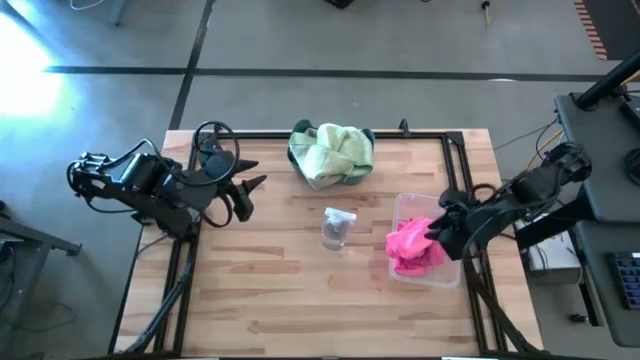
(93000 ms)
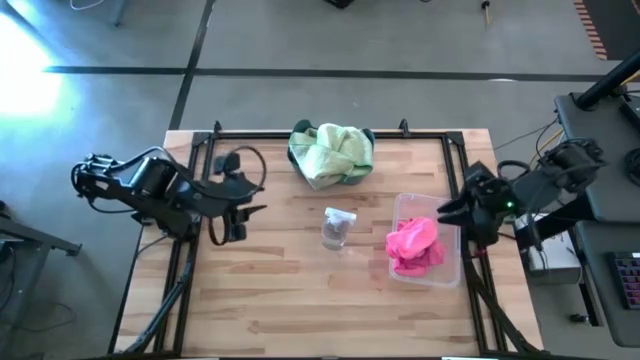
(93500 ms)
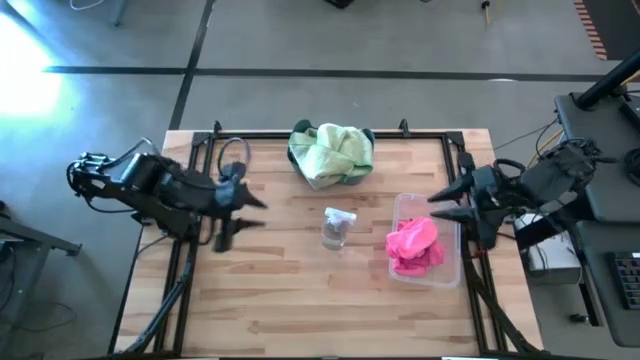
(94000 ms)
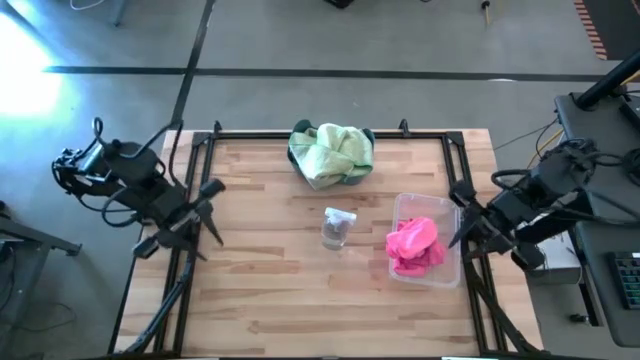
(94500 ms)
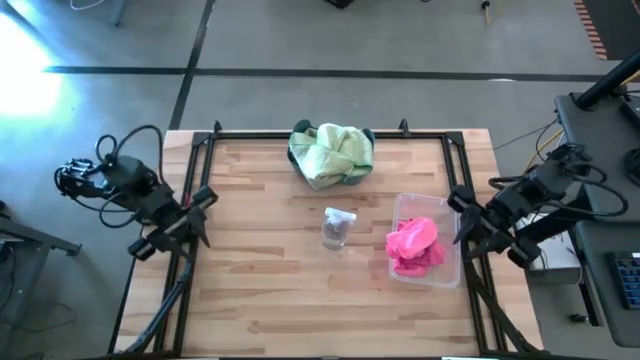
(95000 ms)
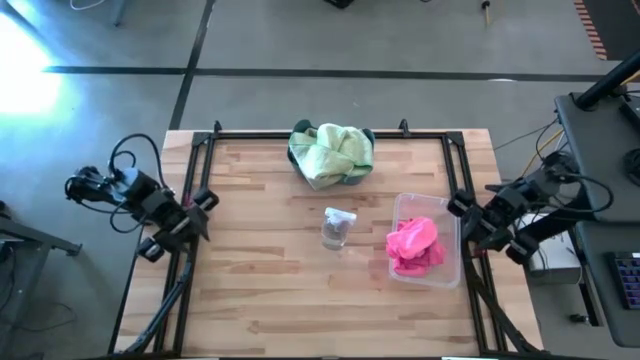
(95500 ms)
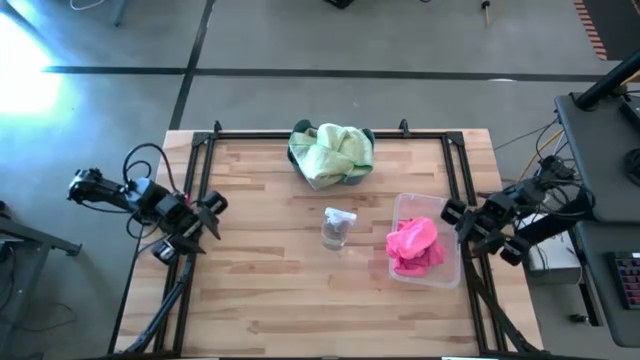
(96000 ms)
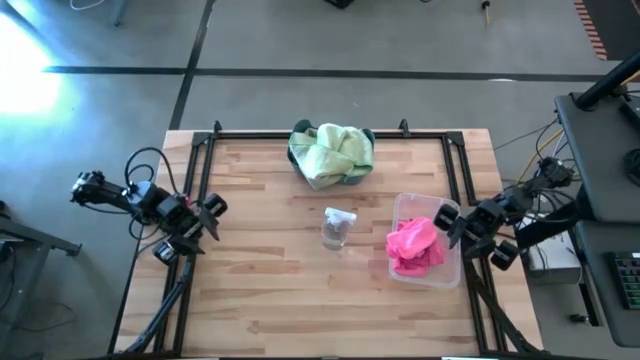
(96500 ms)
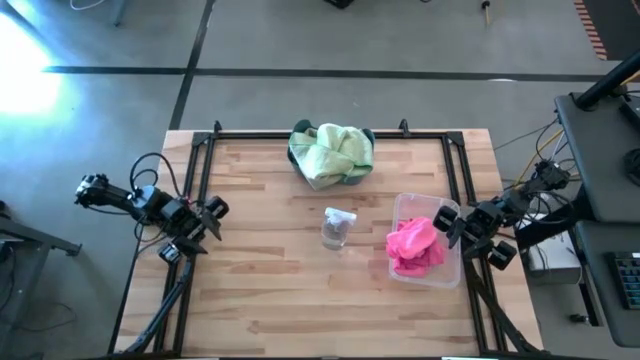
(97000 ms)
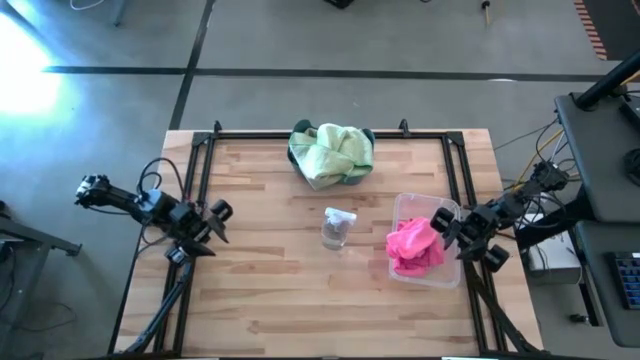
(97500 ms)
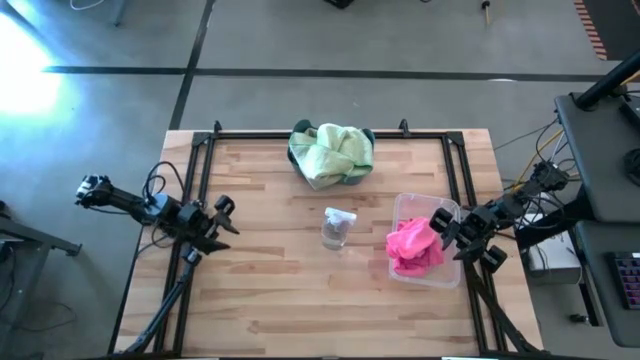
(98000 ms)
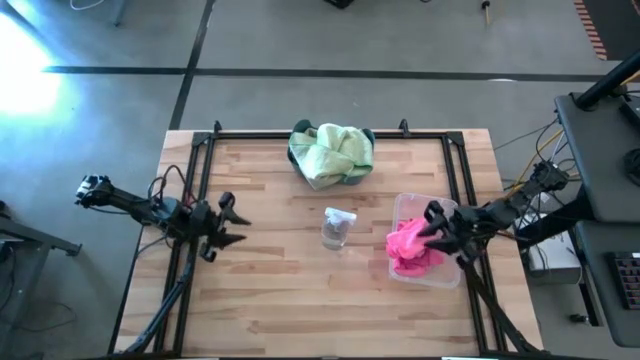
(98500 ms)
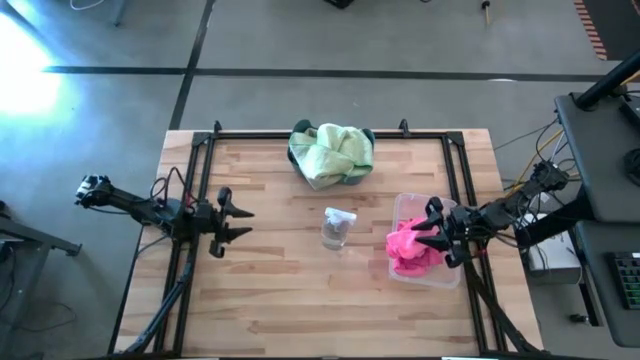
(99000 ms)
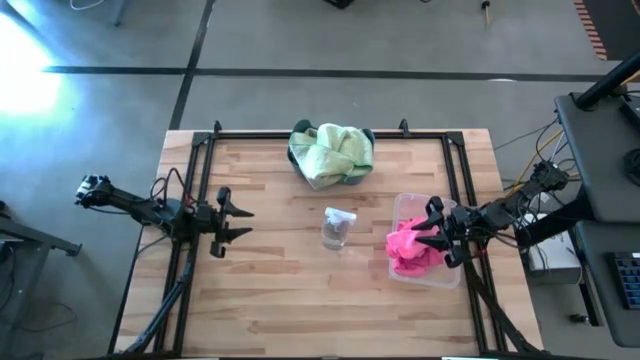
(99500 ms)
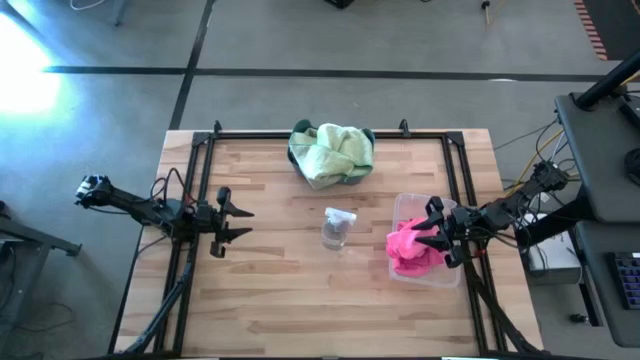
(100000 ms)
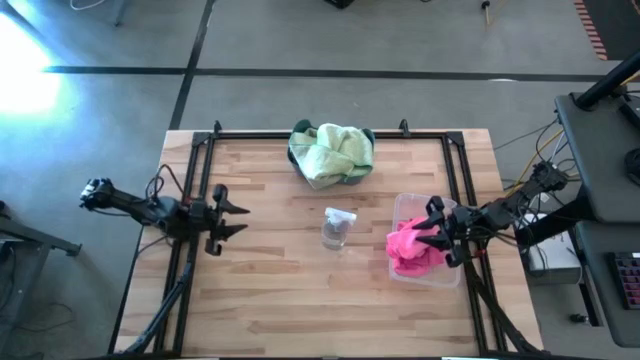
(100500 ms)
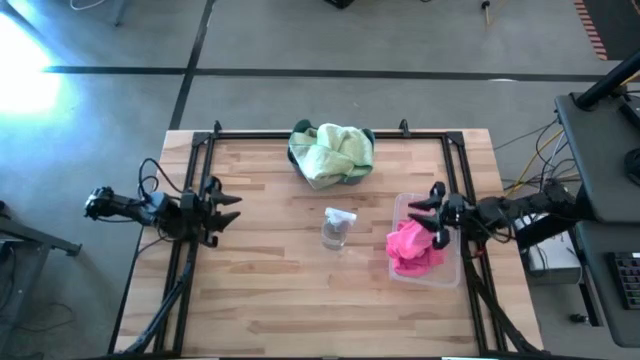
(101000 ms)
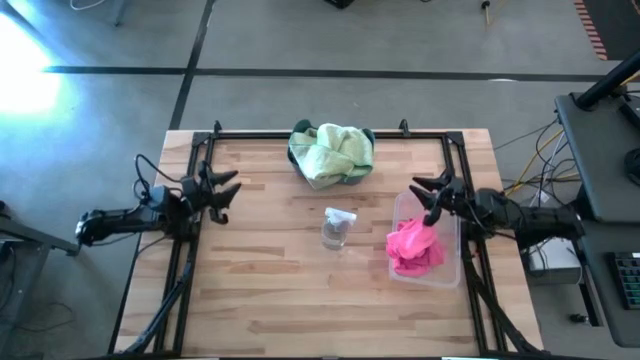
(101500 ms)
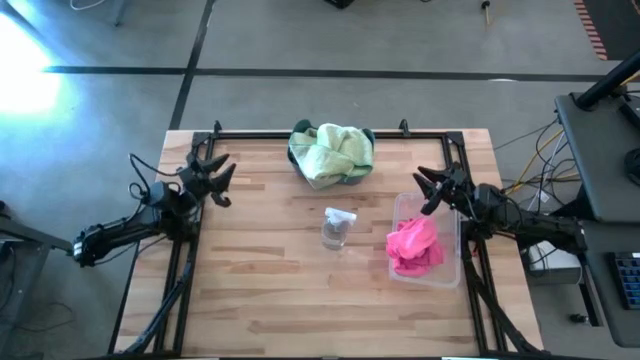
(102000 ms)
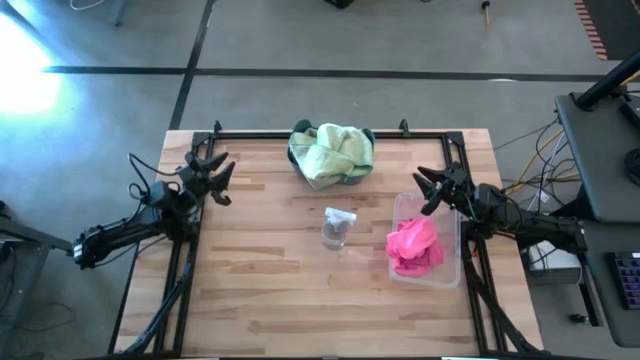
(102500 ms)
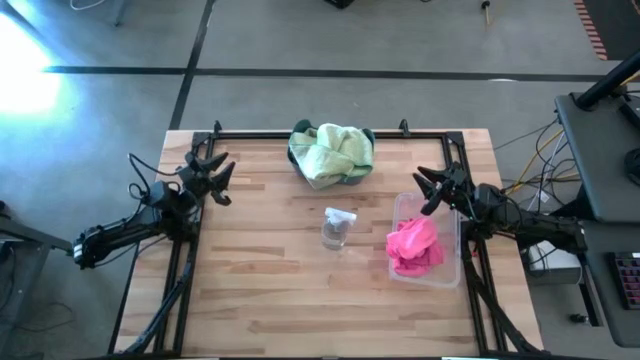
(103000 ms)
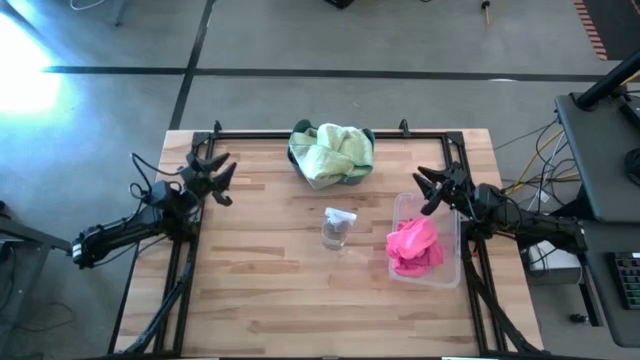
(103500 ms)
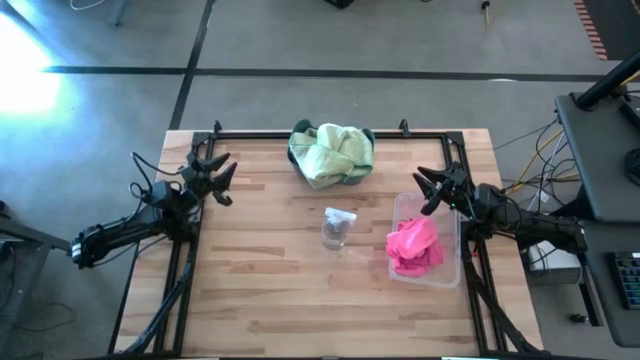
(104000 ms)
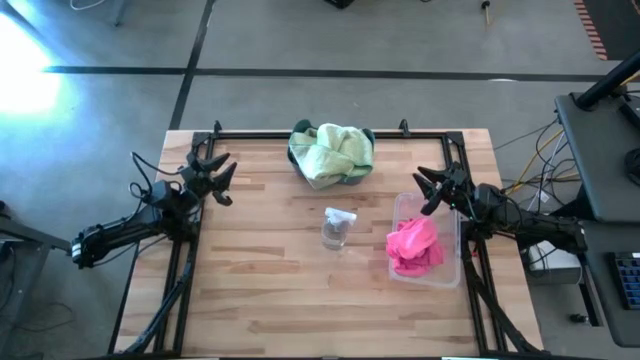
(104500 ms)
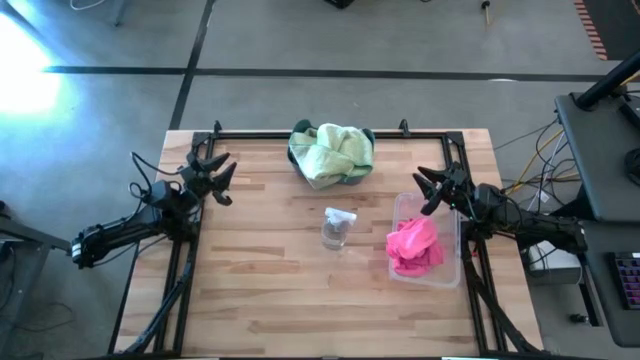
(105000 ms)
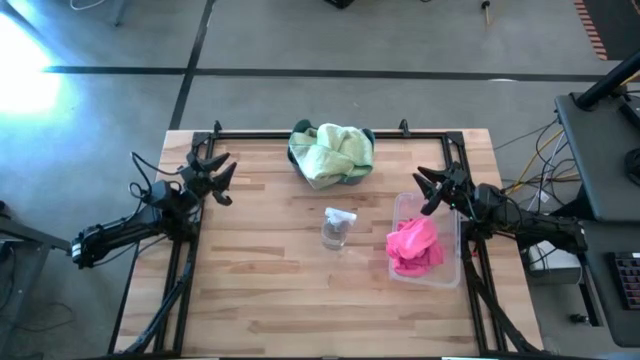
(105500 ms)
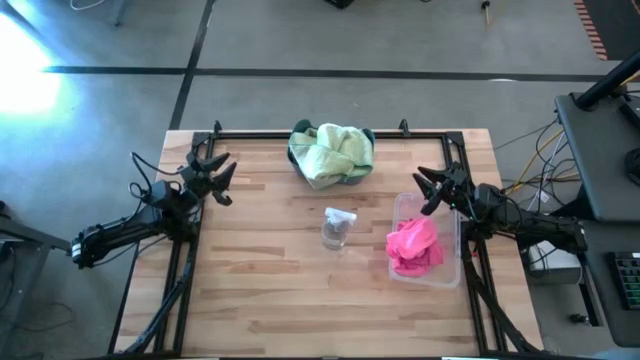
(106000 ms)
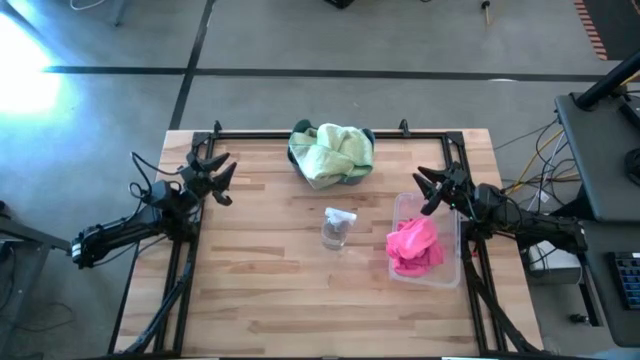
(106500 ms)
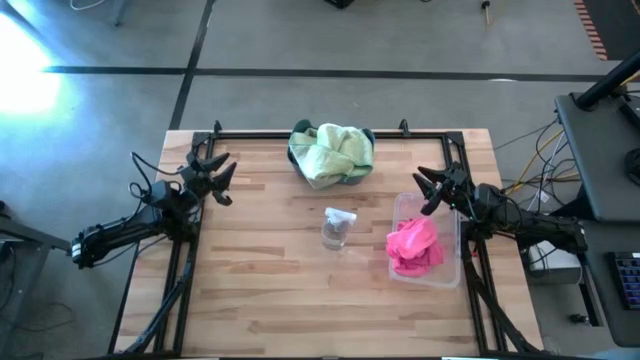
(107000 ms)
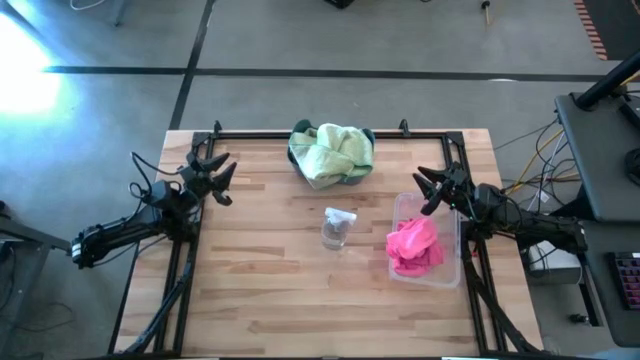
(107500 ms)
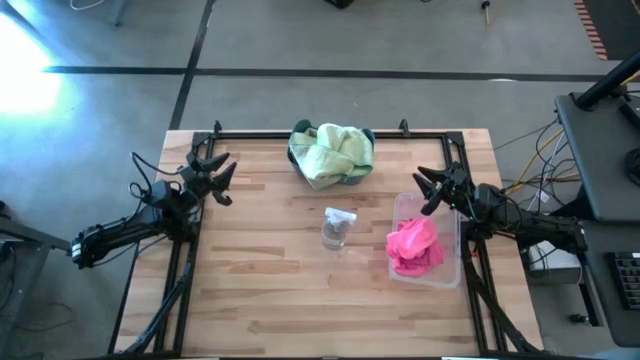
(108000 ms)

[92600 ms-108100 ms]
Task: Sort microfiber towel by color & place in baskets
Return to Home Position

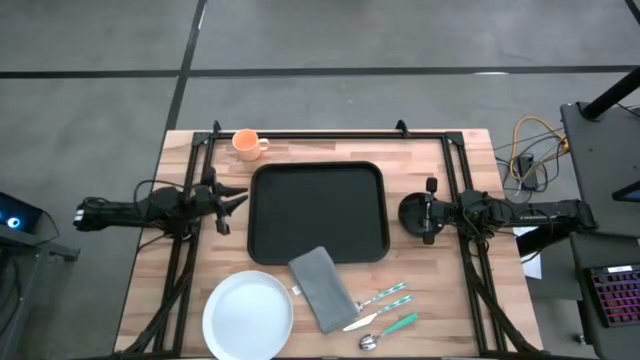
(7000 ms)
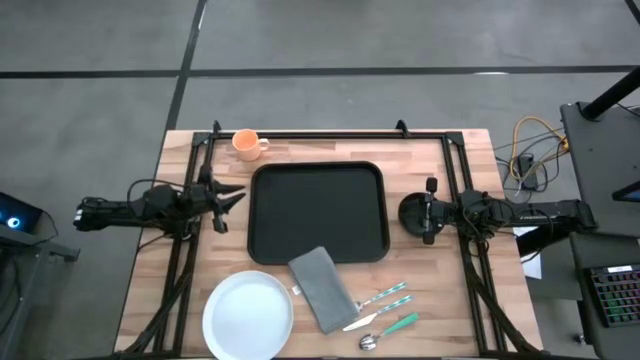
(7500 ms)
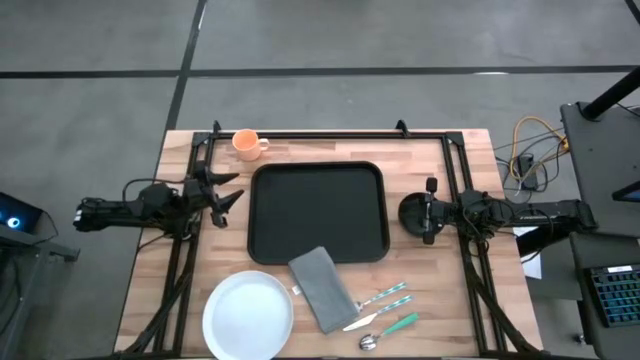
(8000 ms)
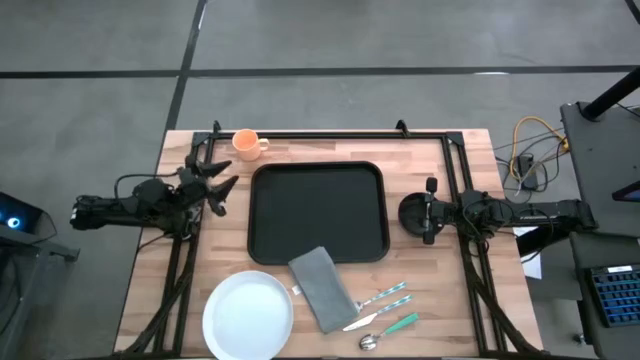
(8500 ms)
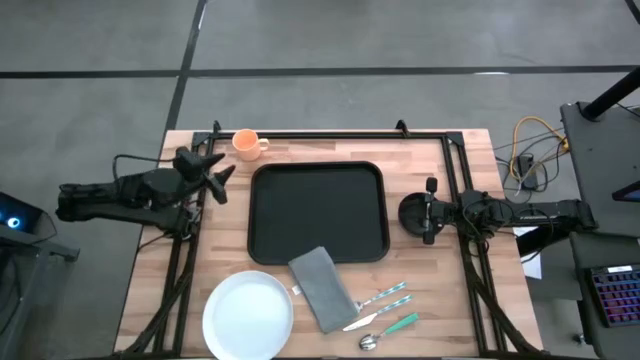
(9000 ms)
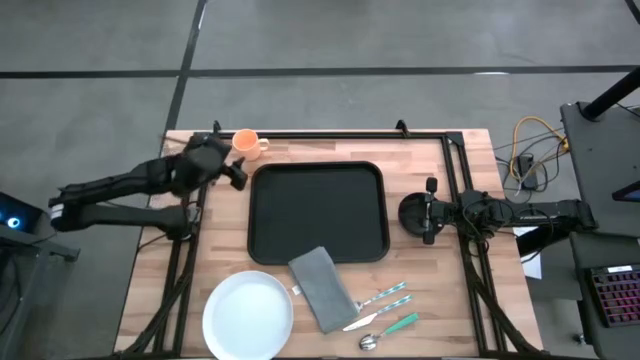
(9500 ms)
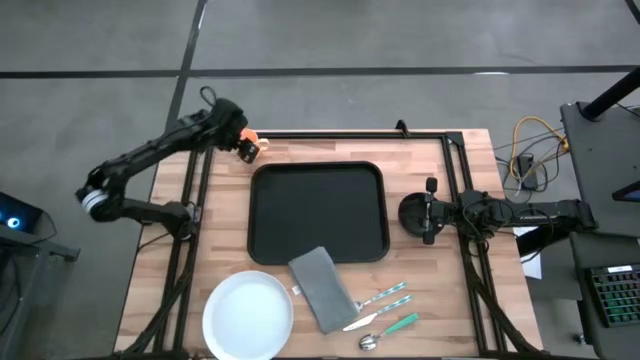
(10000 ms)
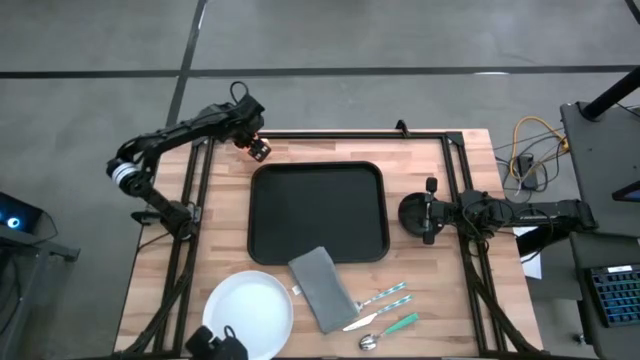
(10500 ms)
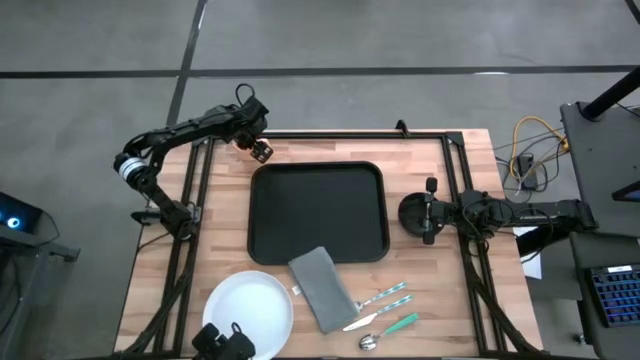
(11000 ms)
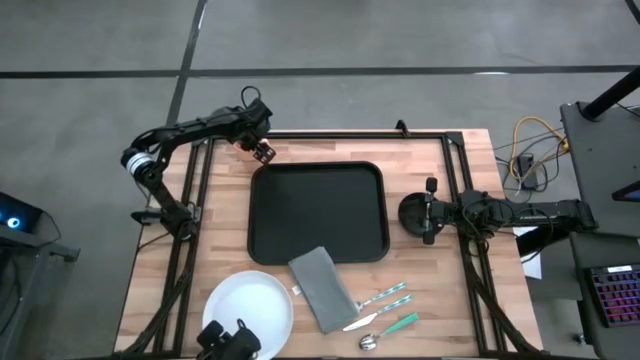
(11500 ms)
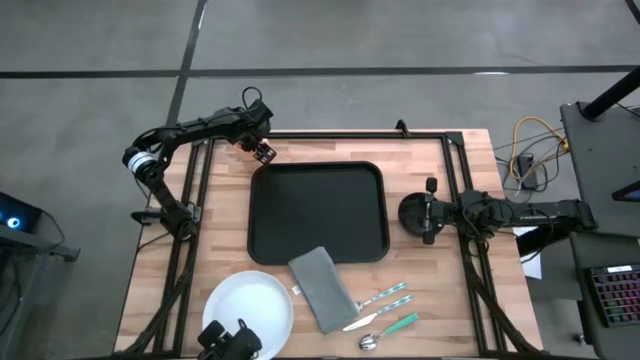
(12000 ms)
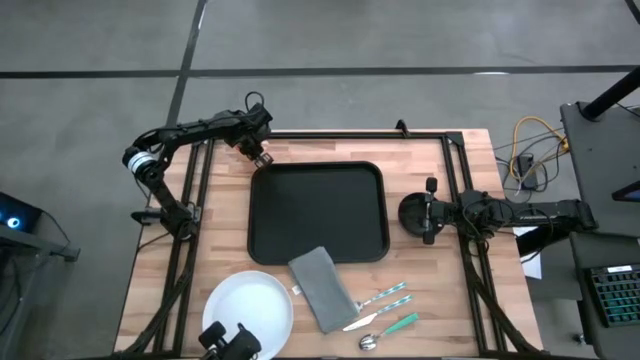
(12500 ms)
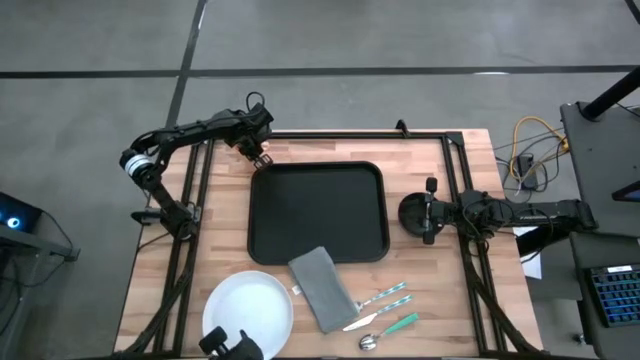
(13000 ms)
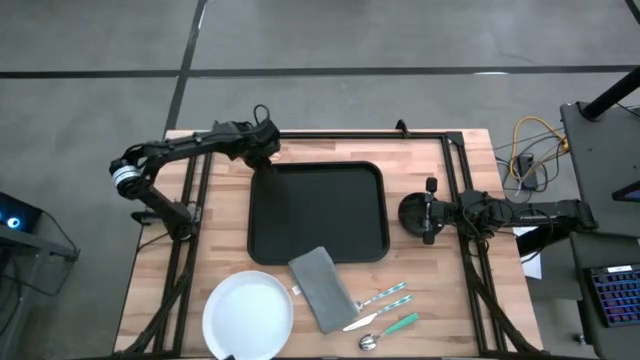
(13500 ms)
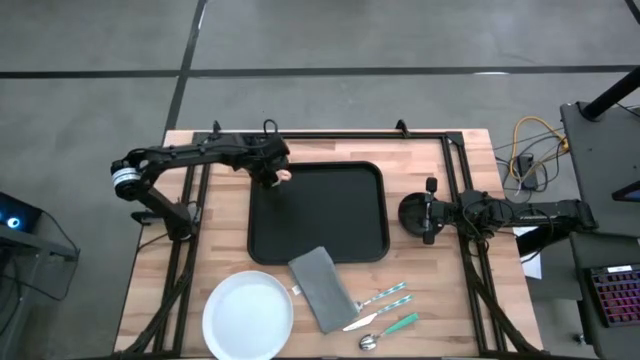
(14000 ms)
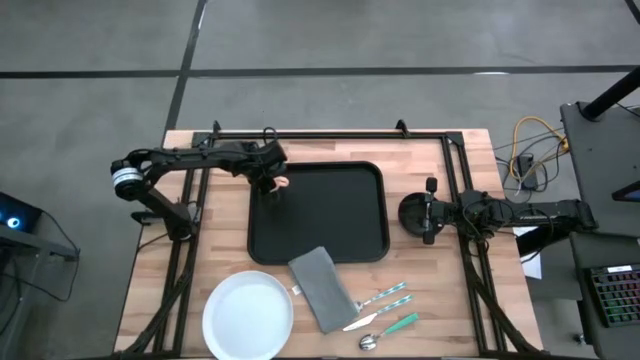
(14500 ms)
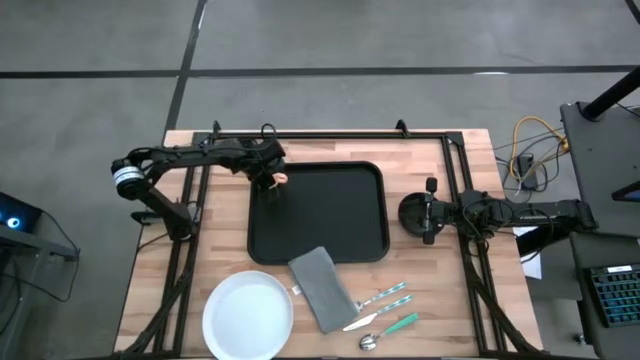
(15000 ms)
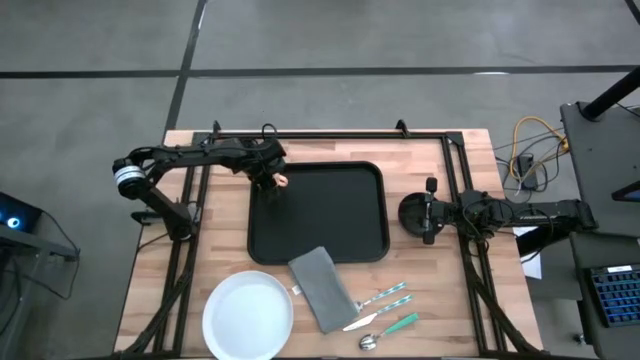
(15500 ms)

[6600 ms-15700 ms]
Task: Set up tray
Put the orange cup on the black tray
